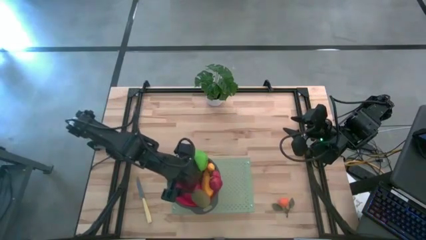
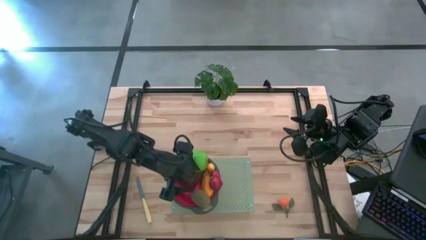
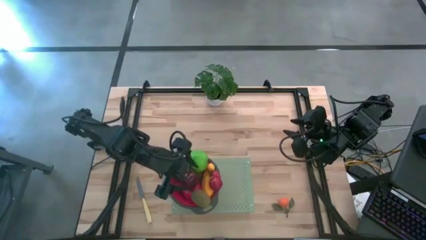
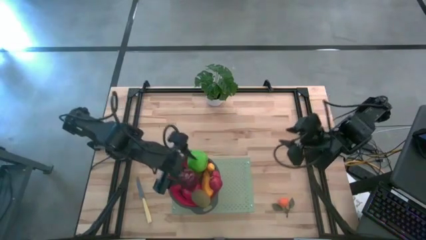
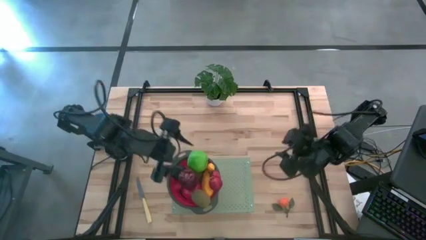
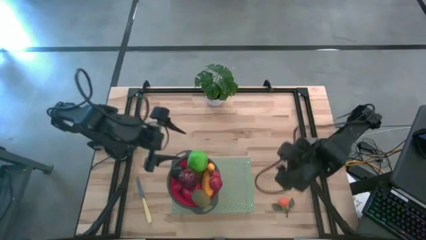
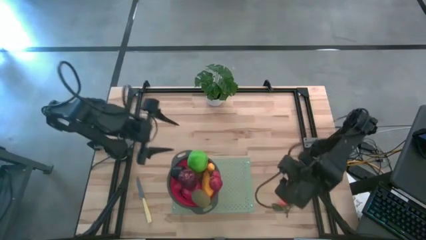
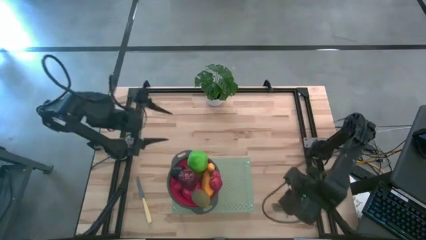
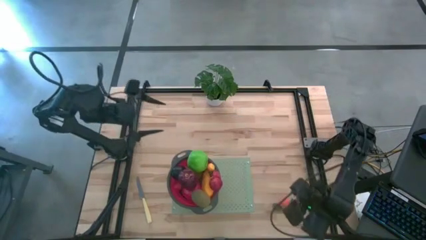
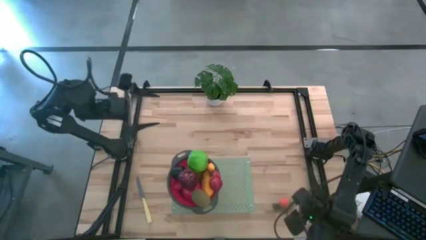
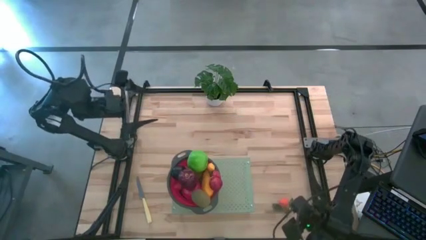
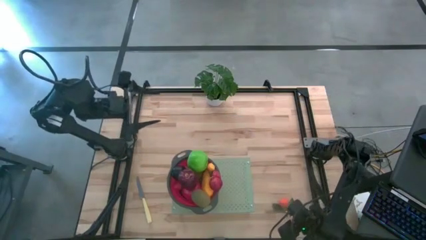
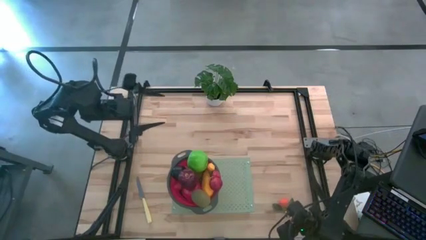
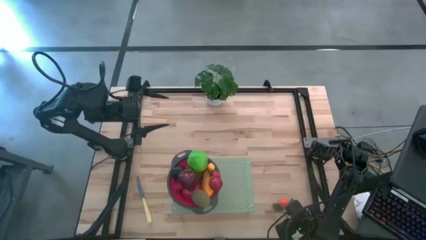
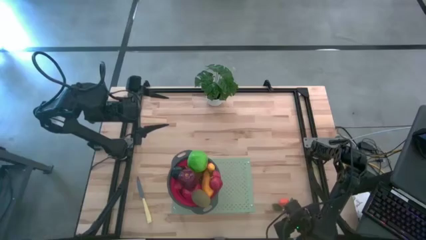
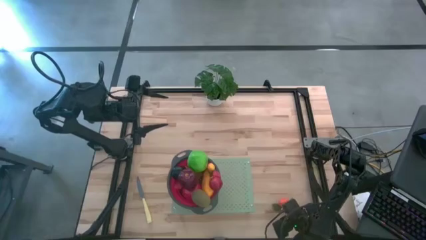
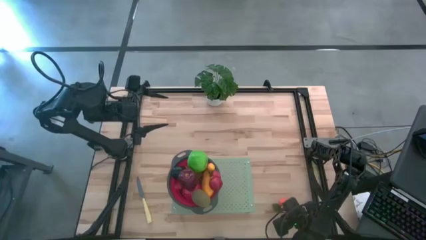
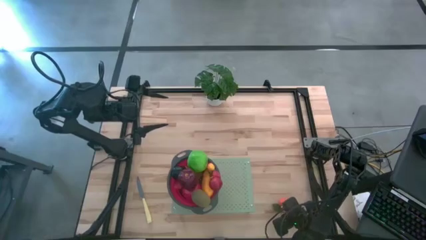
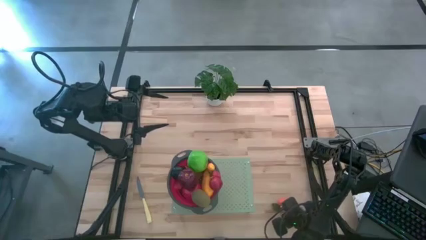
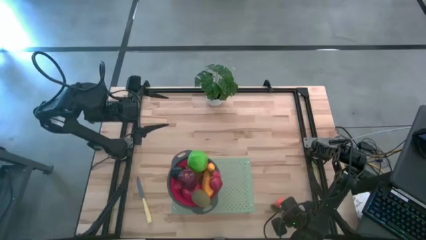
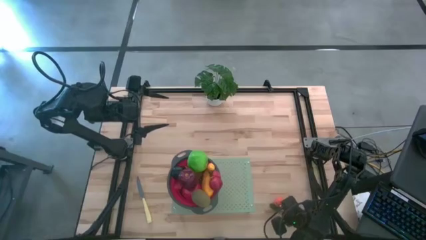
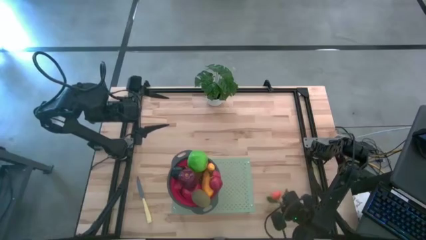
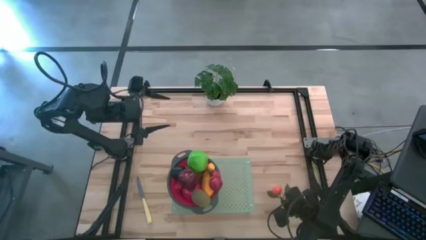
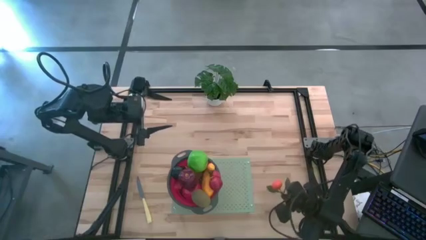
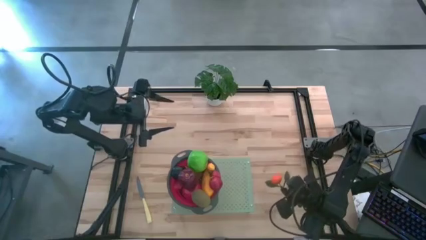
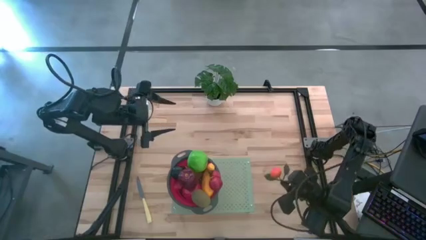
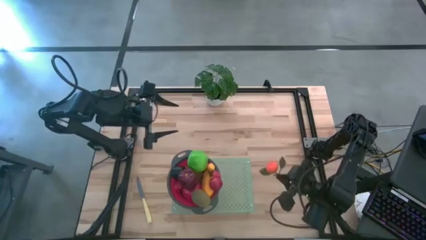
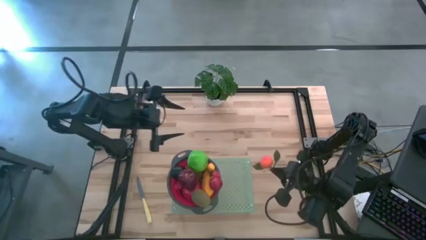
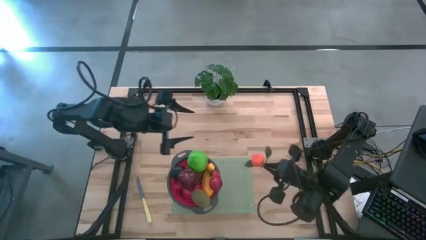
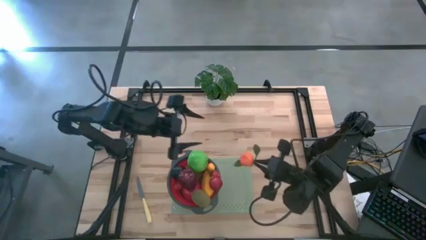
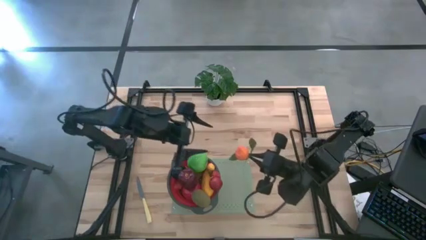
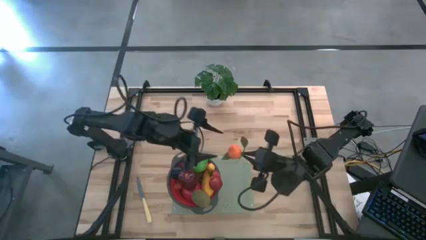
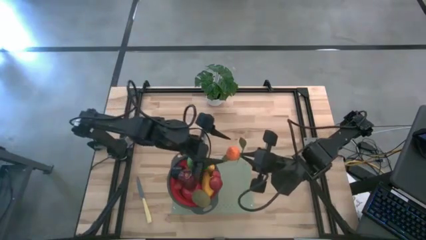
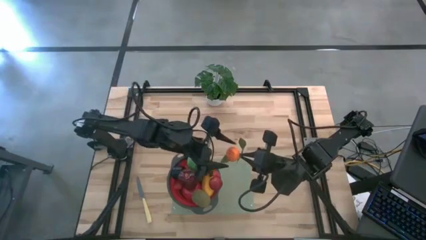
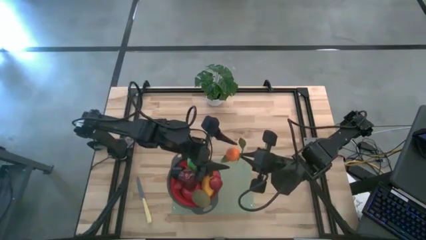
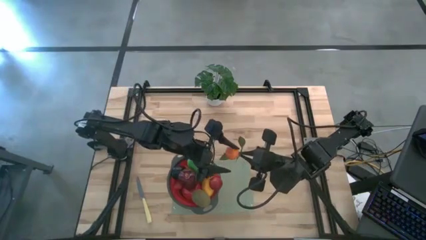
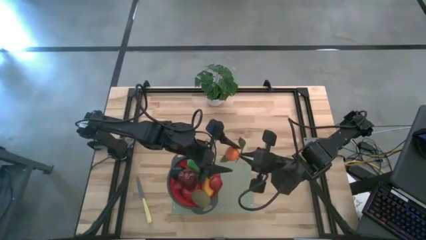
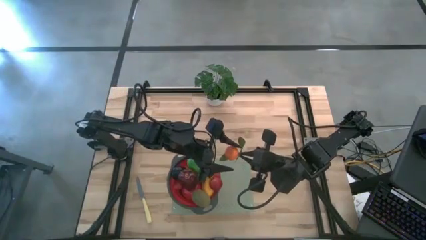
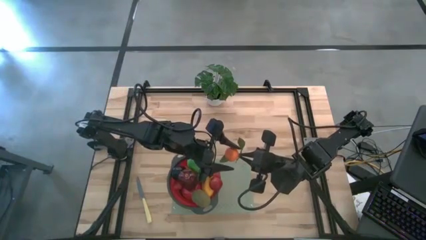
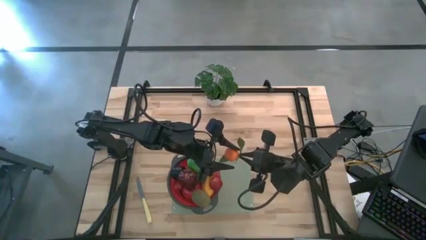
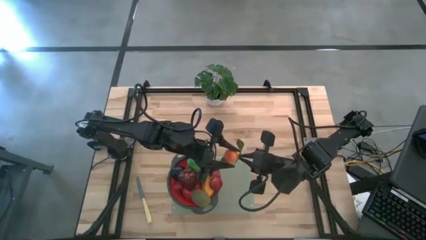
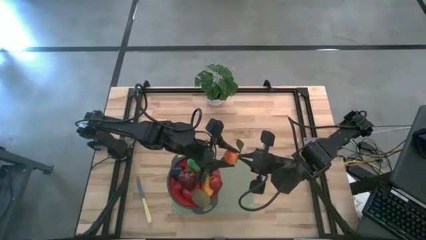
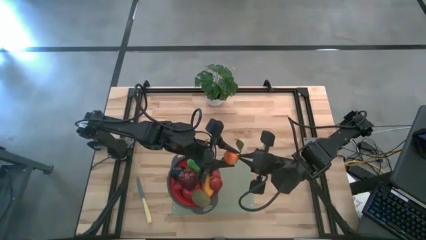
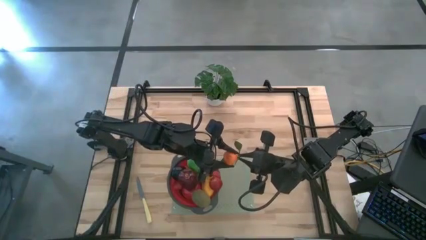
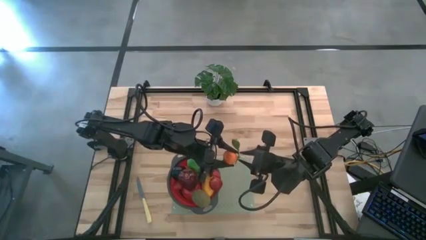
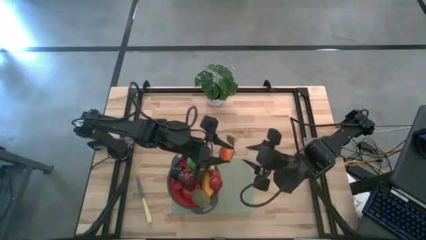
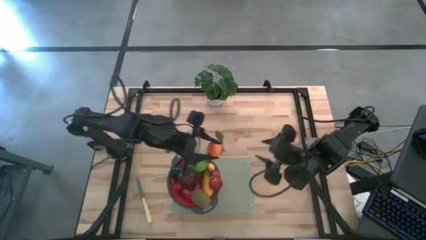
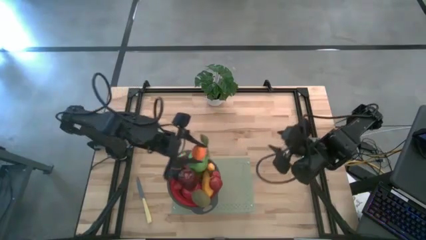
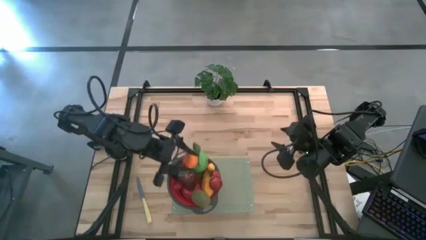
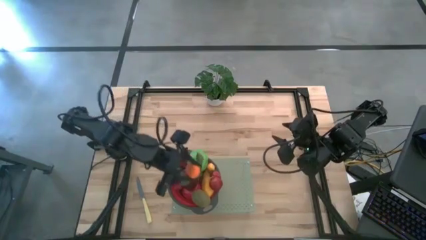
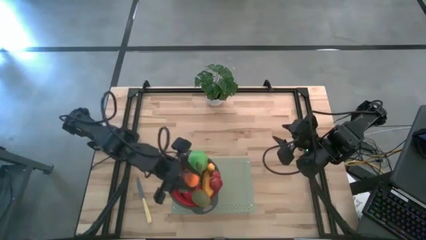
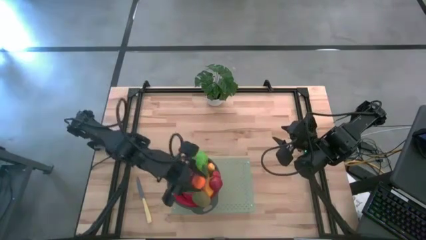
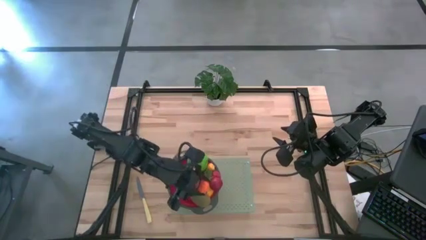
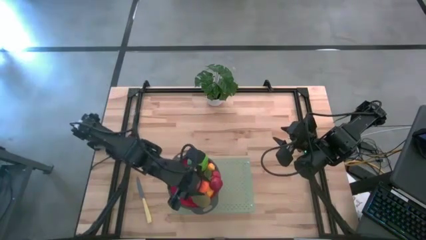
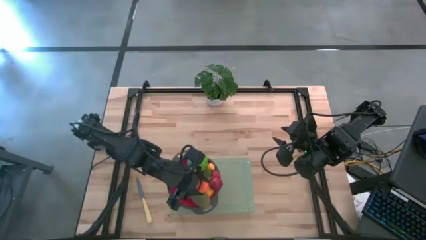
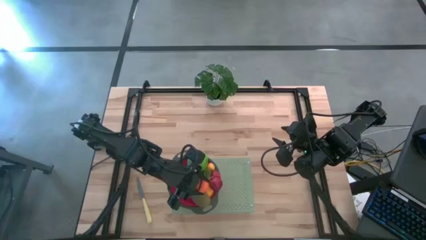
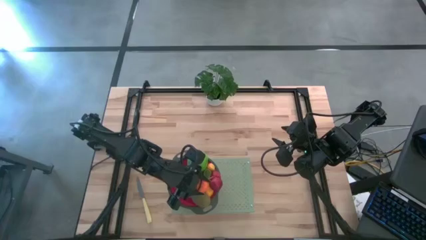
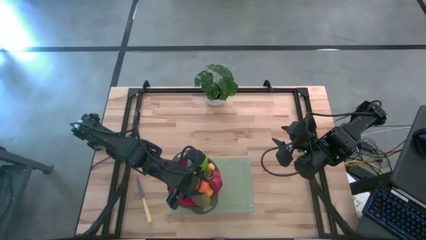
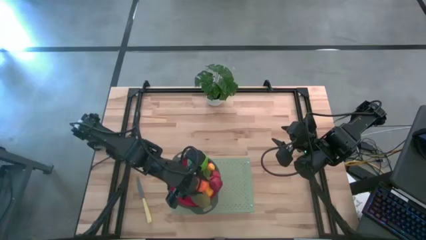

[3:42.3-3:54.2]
Task: Pick & Place Fruit
Put the orange into the red strainer

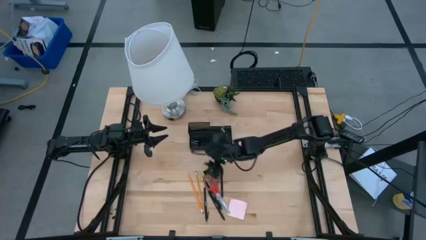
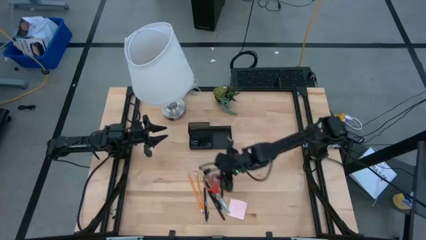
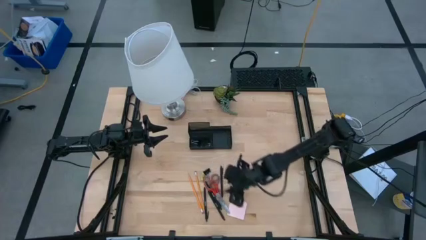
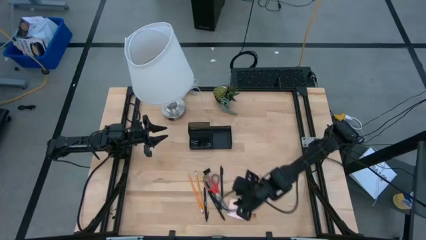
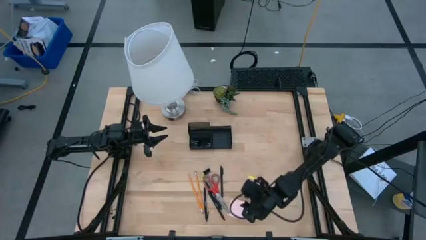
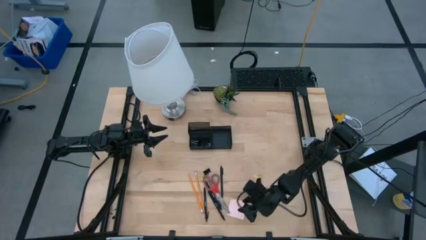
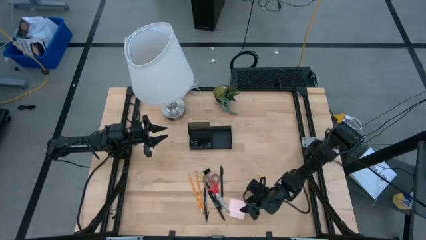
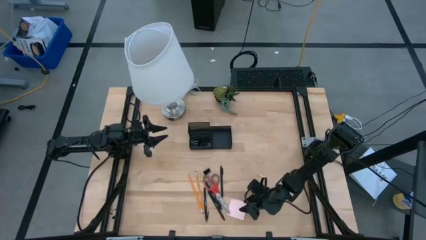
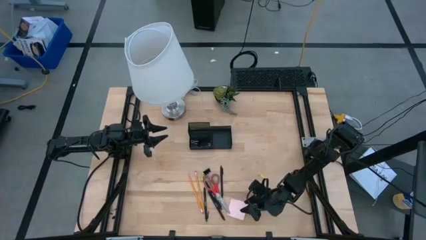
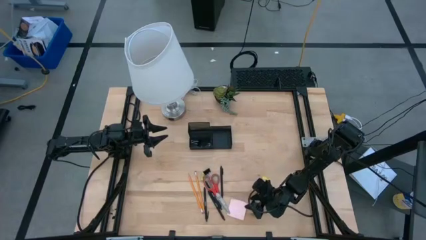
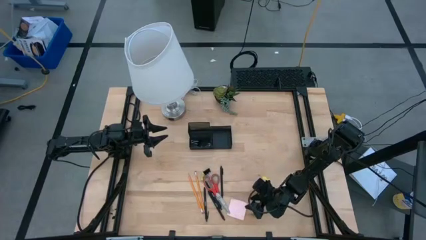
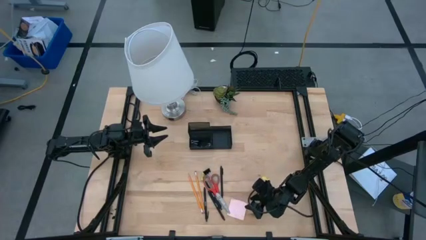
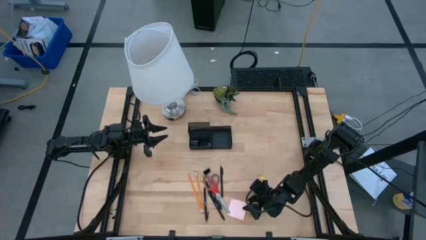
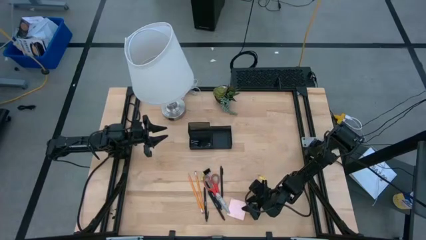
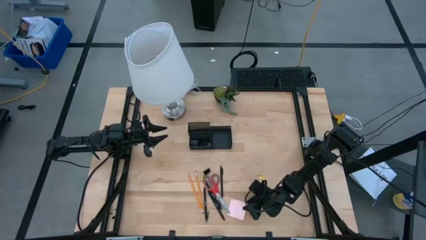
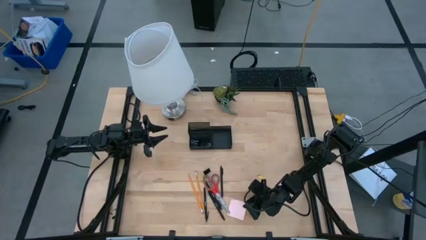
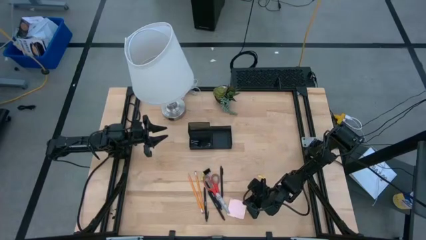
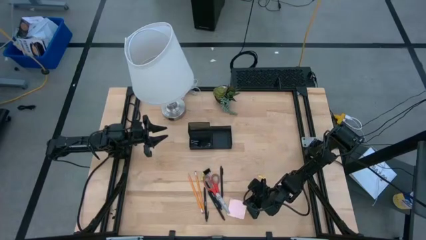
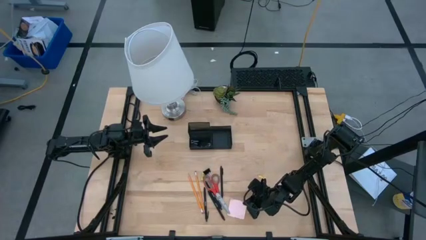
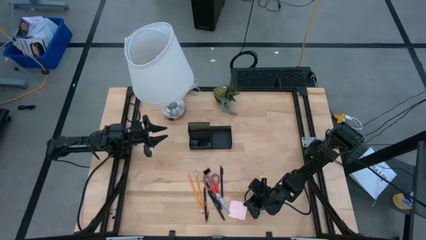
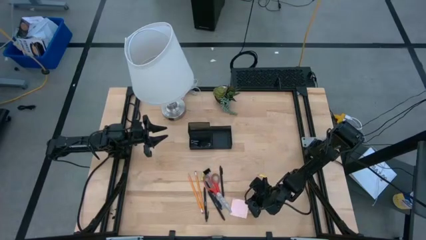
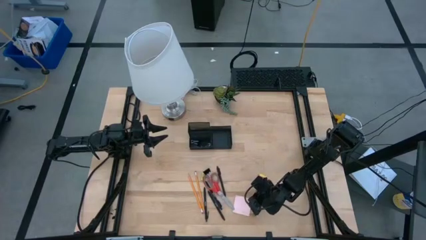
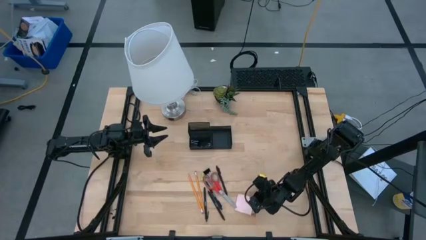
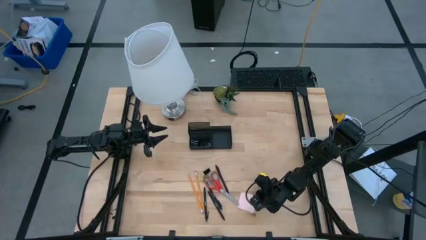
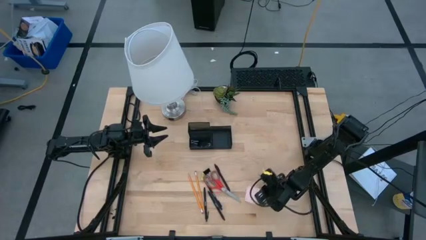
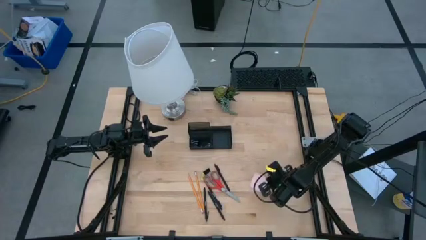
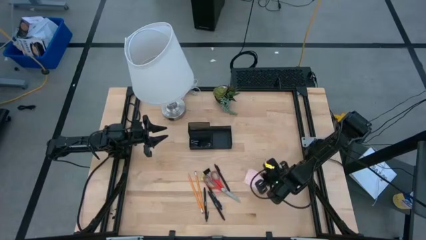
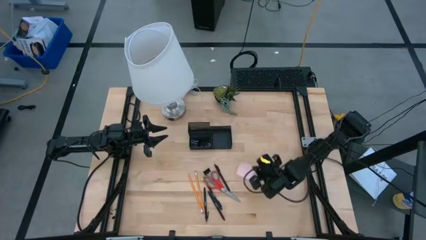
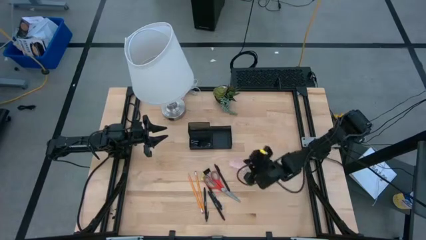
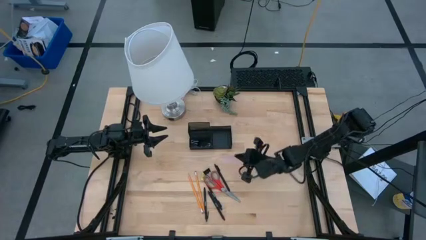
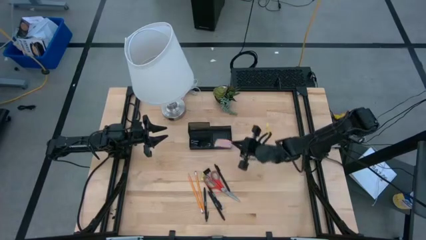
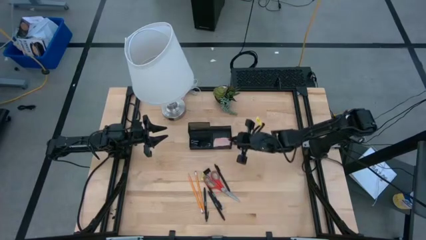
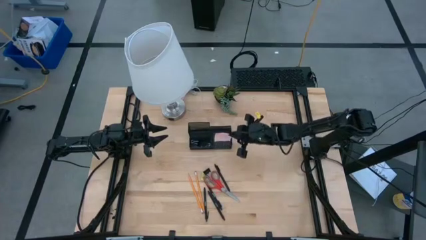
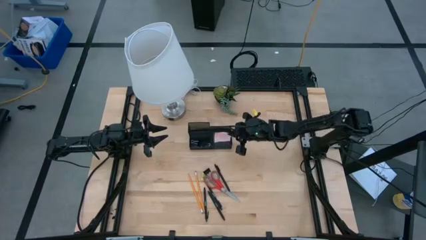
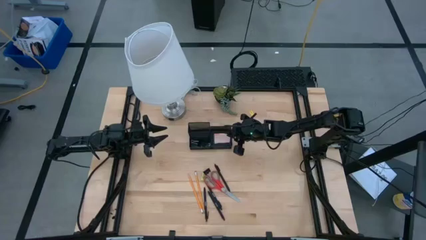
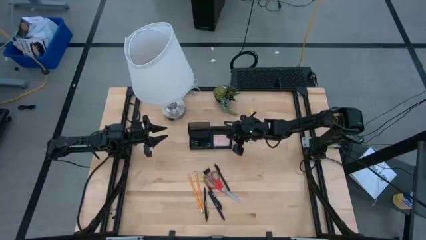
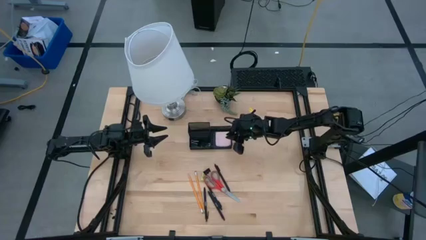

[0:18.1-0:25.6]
Task: Pick and place office supplies into organizer
Put the pink sticky note into the black desk organizer
